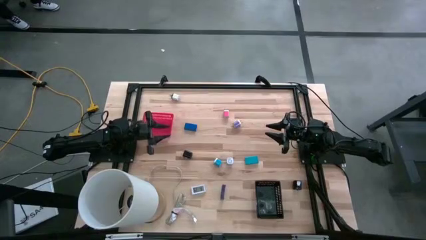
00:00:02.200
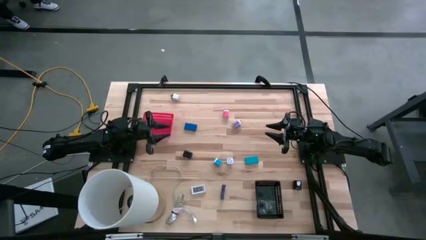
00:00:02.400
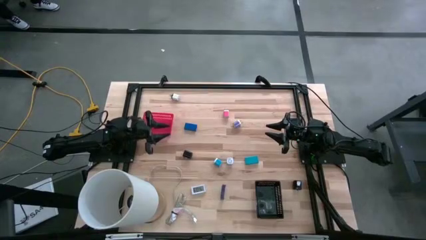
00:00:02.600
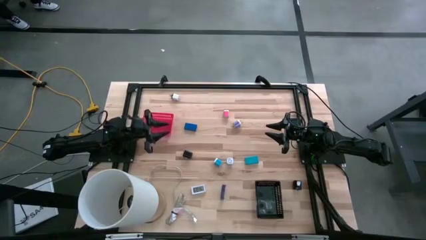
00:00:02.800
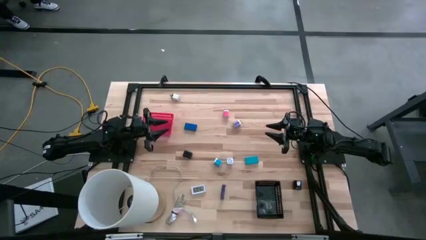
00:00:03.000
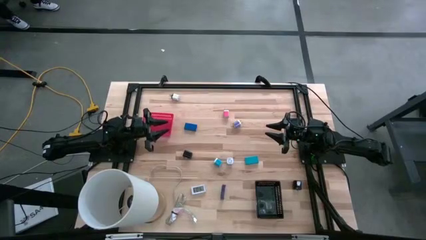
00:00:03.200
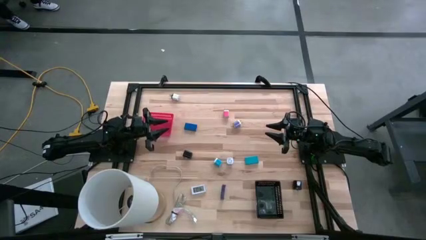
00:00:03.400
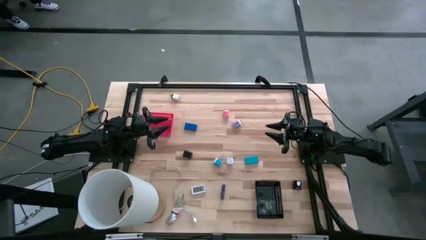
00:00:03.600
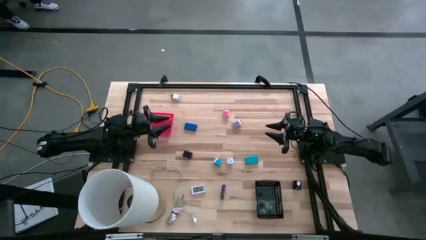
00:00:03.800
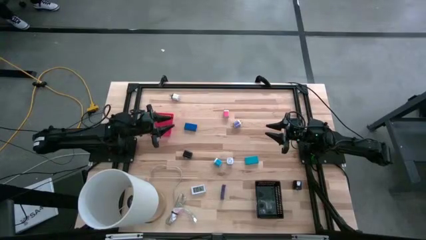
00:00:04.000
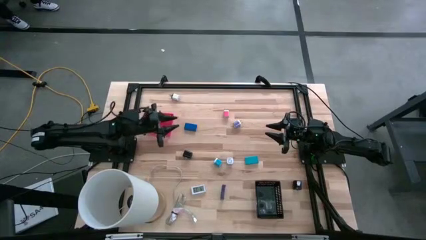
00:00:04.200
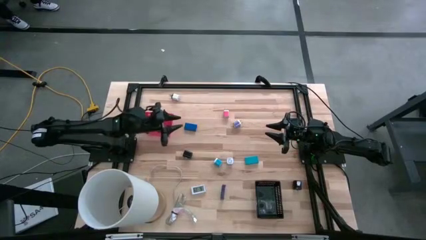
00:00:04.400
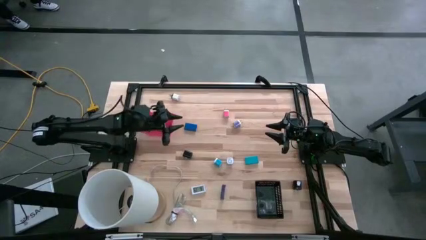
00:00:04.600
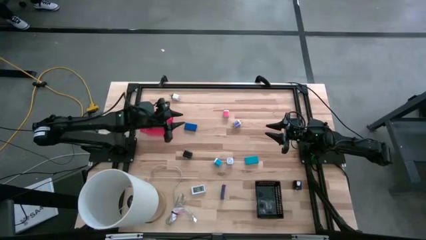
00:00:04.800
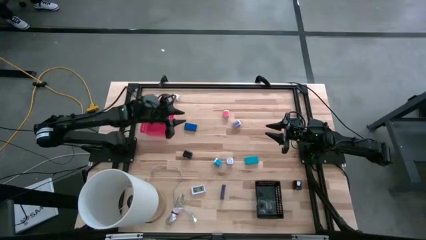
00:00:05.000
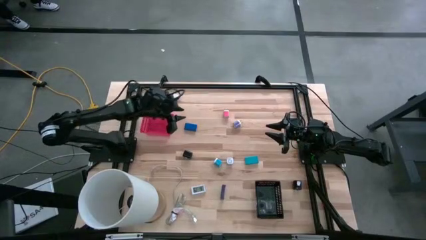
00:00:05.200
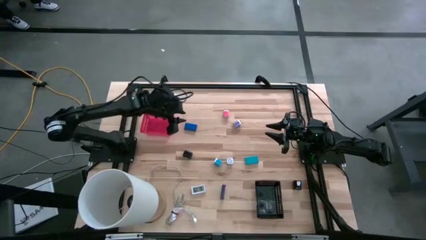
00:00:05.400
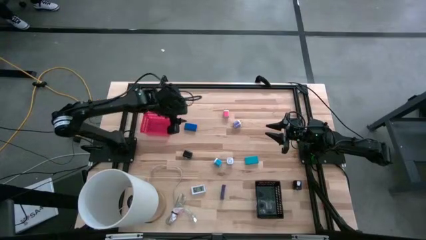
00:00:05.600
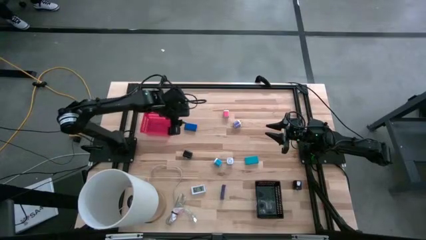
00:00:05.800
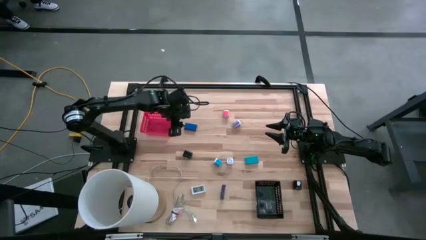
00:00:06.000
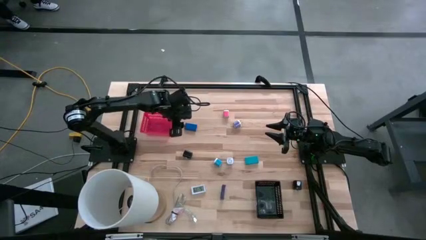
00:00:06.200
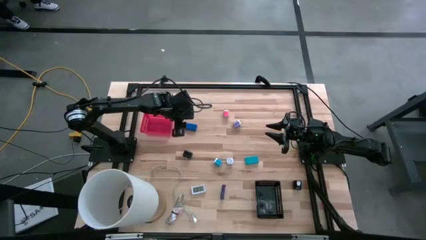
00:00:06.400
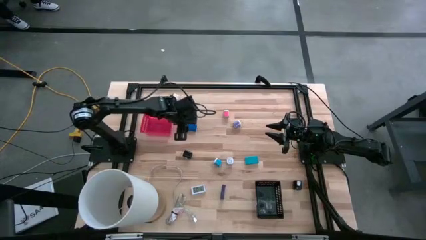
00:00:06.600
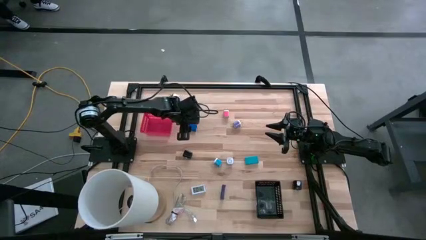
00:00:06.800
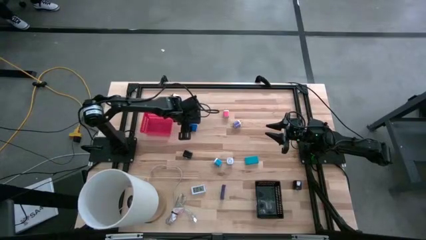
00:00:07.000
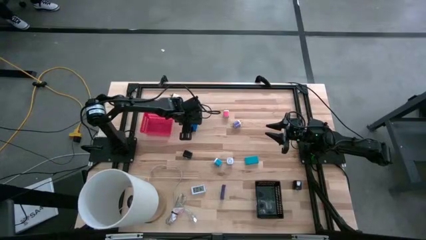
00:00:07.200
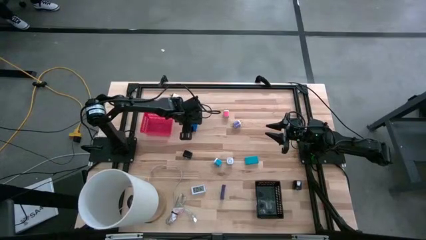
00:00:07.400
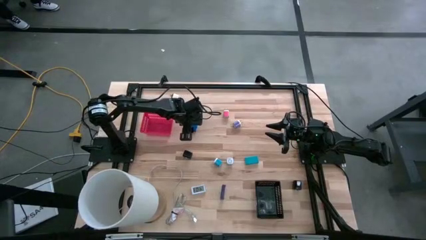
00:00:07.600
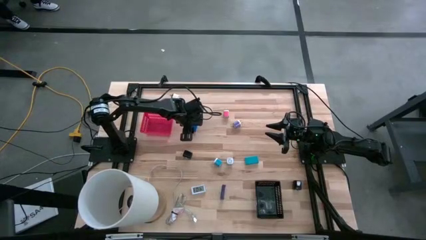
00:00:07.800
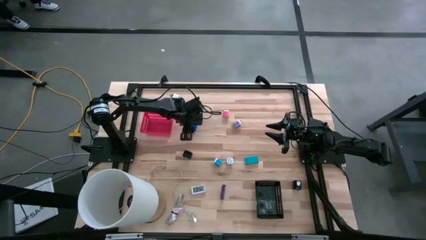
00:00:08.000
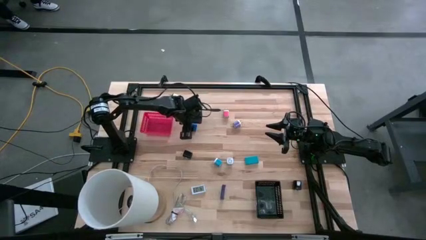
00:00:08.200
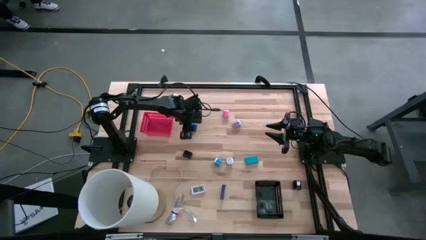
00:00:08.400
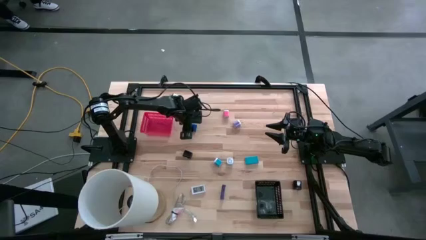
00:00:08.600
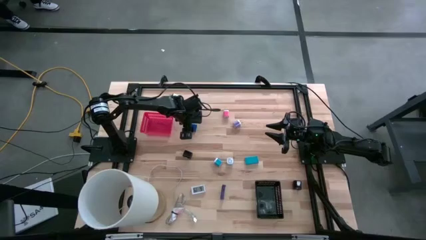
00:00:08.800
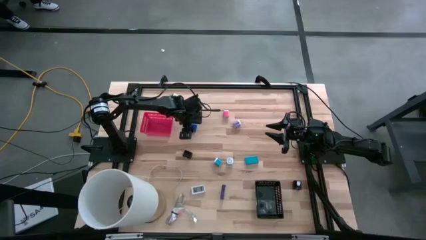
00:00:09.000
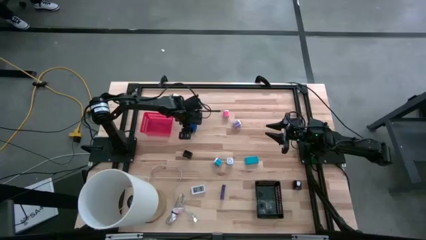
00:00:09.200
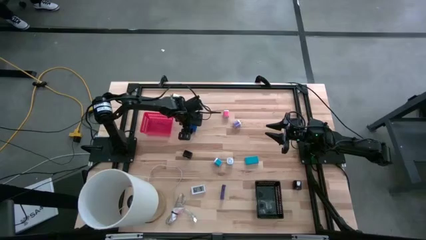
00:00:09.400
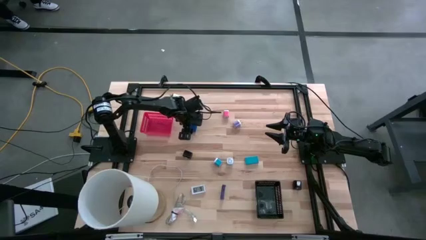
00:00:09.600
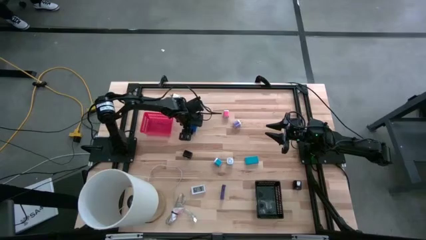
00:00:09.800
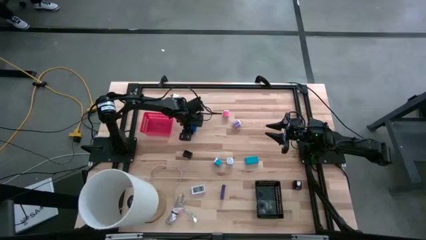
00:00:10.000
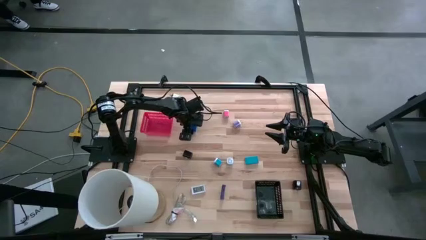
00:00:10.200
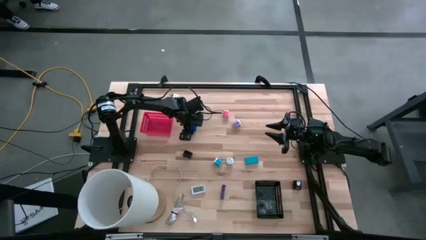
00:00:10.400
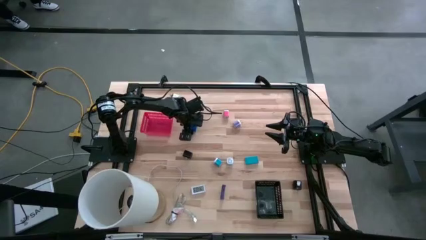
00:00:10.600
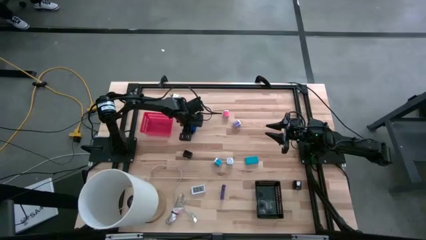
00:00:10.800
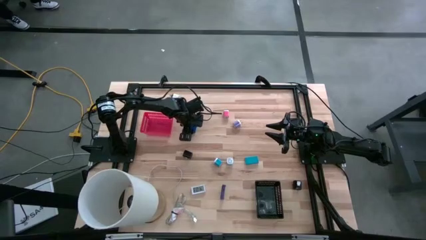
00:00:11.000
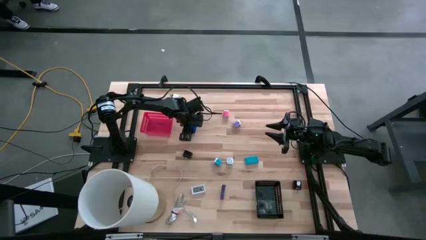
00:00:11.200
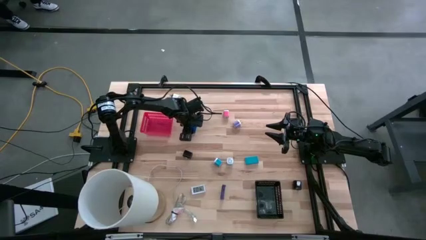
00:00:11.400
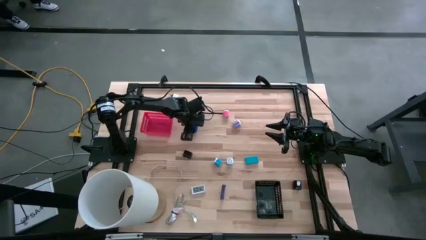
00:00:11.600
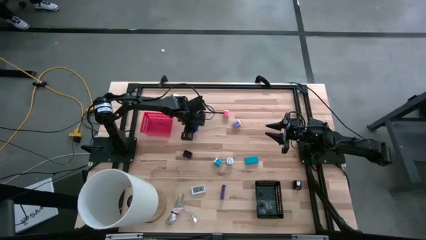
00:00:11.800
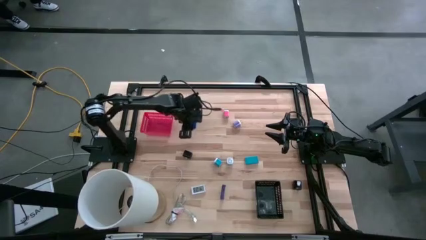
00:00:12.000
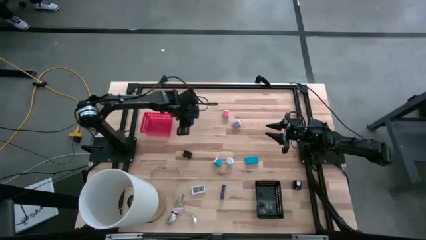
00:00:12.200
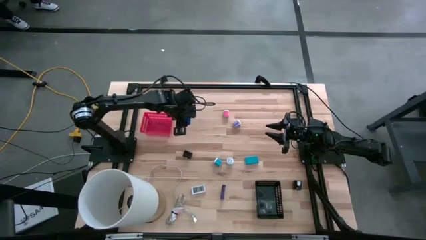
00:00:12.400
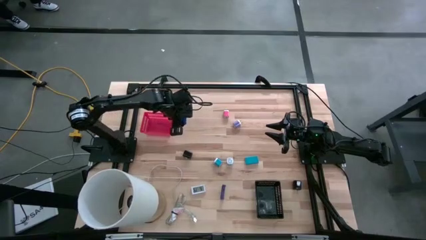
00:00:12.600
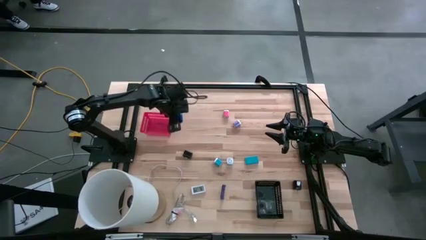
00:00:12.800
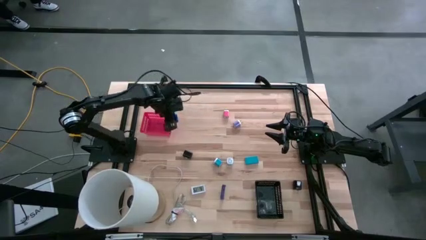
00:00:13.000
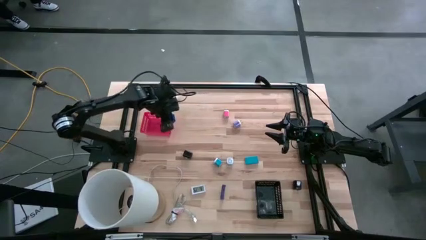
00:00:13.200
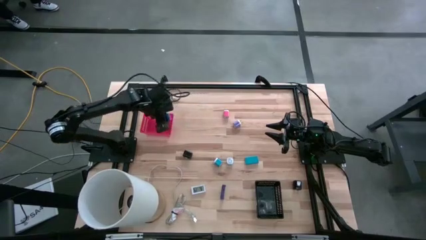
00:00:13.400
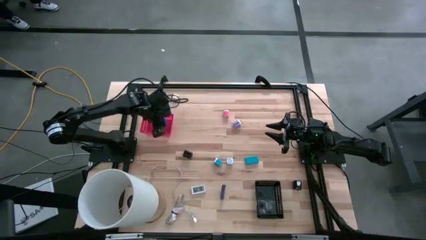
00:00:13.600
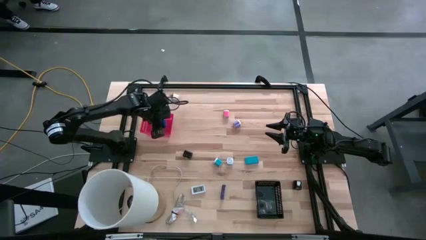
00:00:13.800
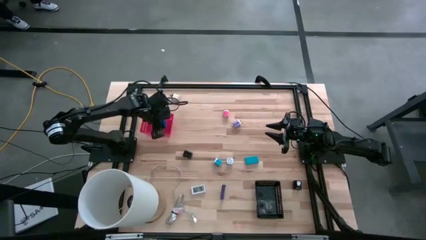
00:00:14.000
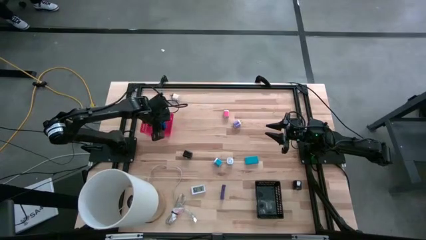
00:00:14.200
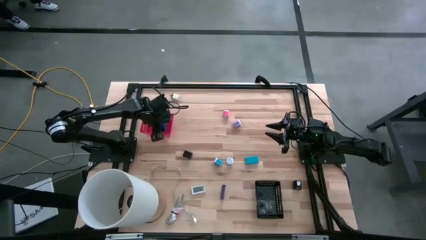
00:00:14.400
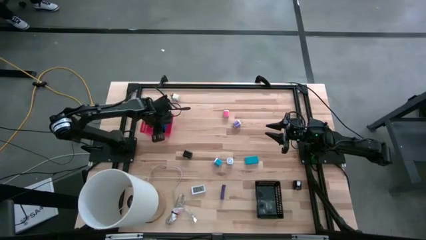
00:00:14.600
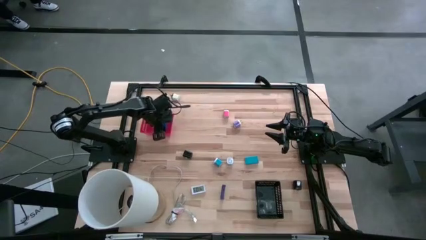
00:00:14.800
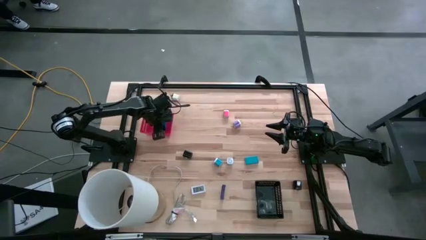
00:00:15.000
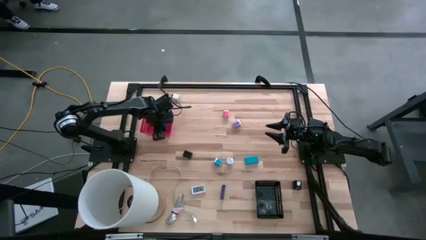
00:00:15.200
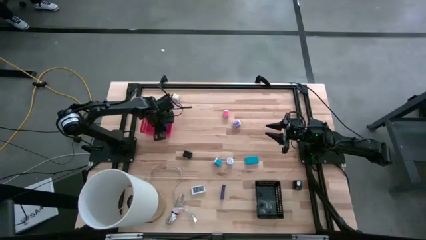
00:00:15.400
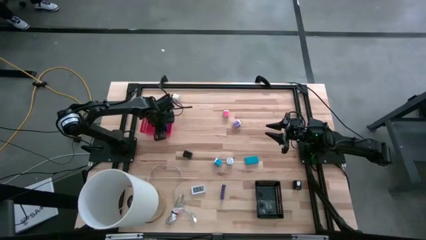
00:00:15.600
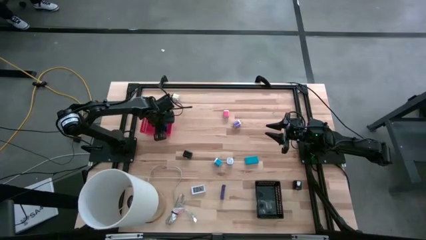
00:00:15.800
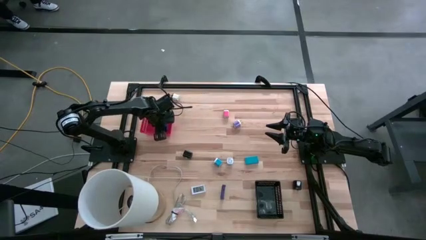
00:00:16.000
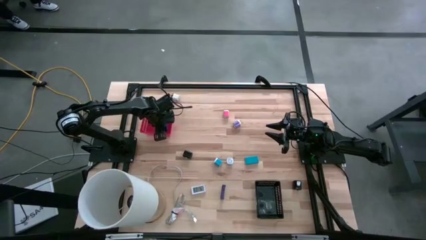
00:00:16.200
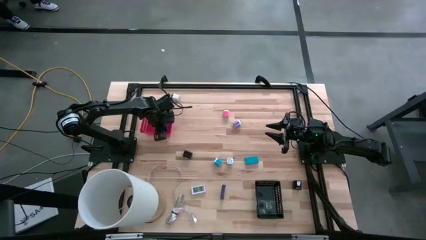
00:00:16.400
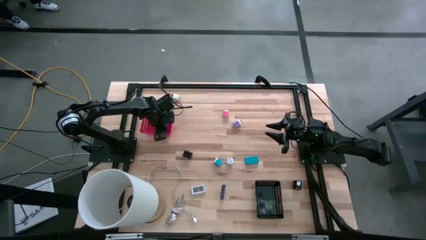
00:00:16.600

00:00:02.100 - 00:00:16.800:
Task: Pick & Place Office items
Put the dark blue digital clock into the red bin
